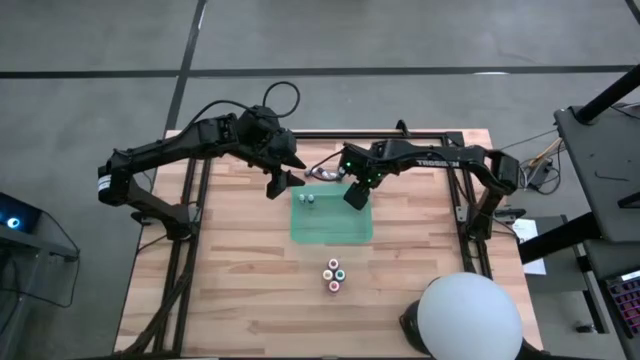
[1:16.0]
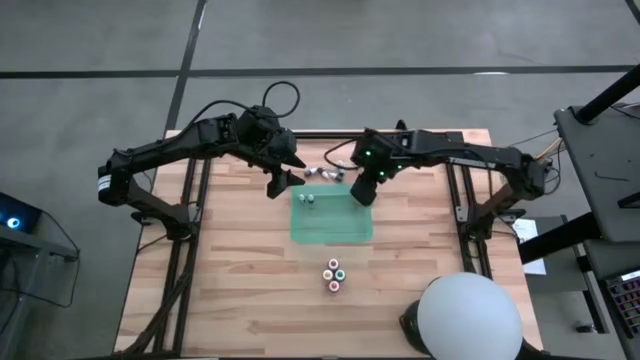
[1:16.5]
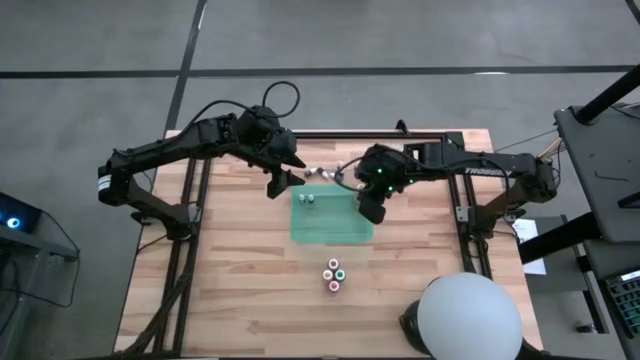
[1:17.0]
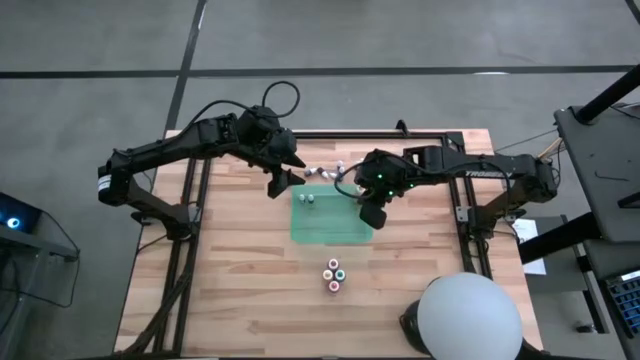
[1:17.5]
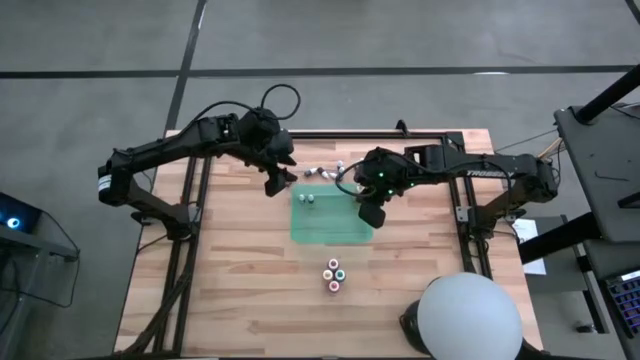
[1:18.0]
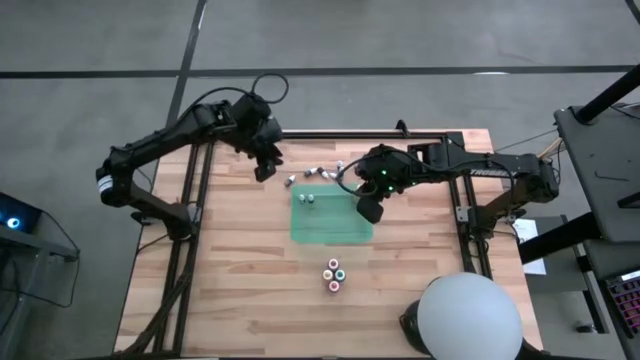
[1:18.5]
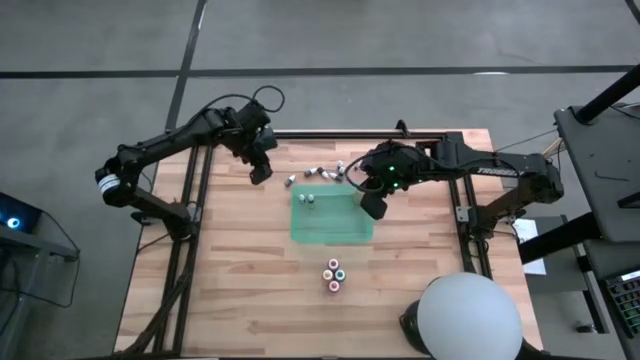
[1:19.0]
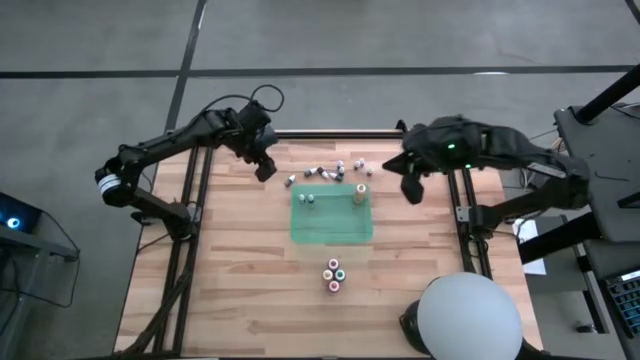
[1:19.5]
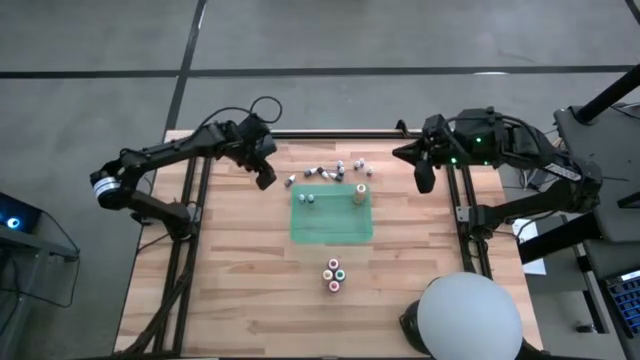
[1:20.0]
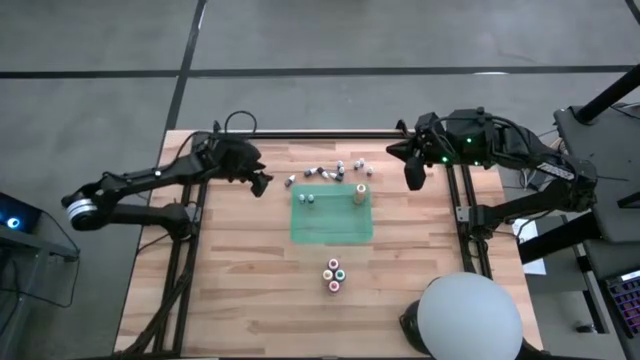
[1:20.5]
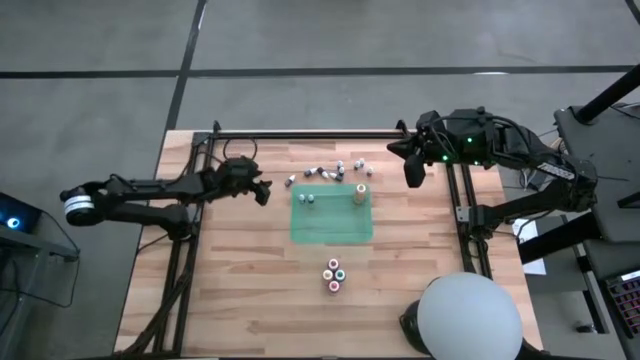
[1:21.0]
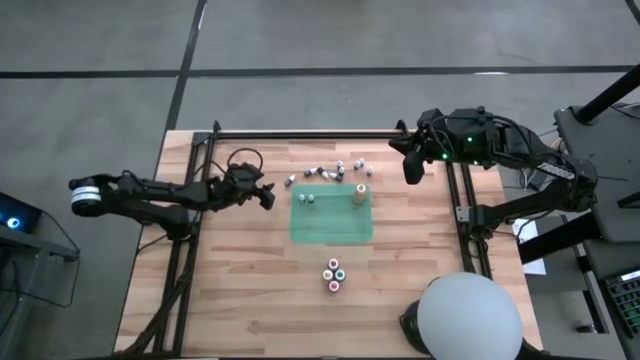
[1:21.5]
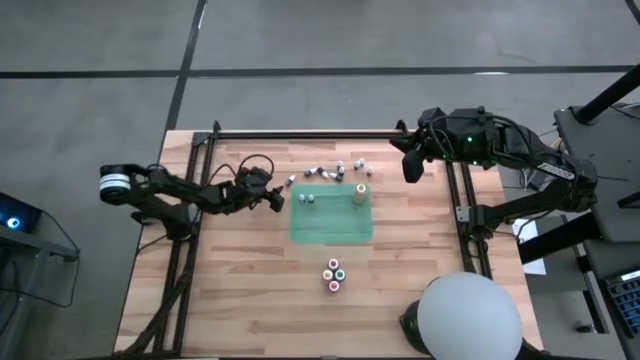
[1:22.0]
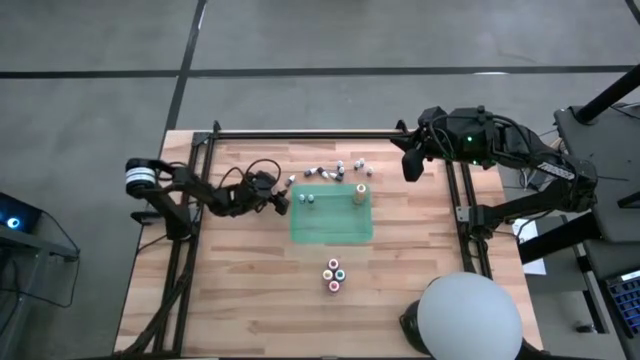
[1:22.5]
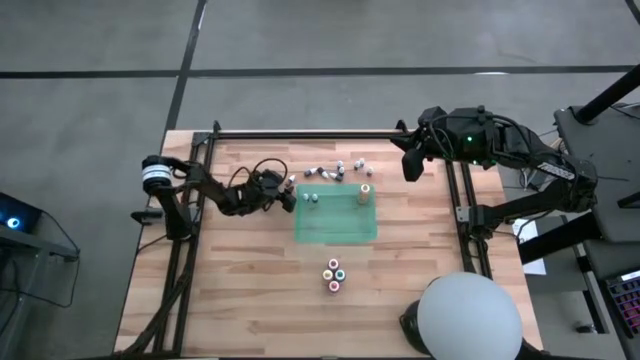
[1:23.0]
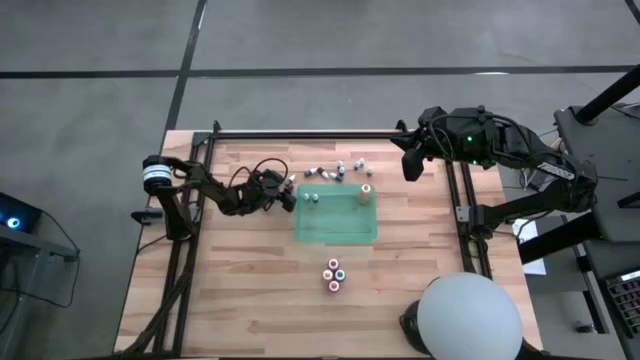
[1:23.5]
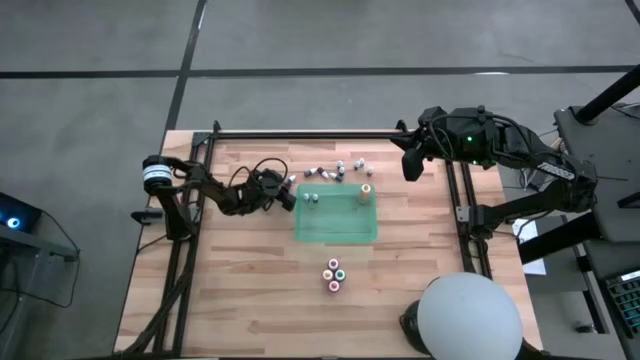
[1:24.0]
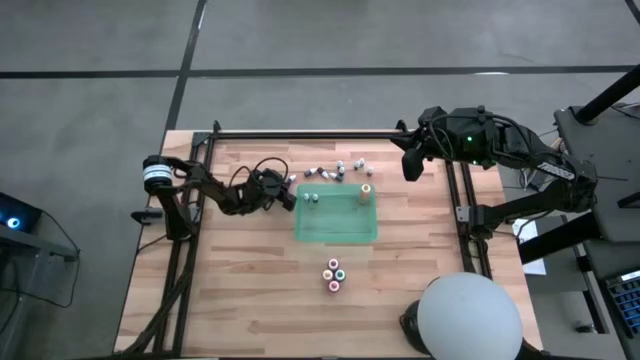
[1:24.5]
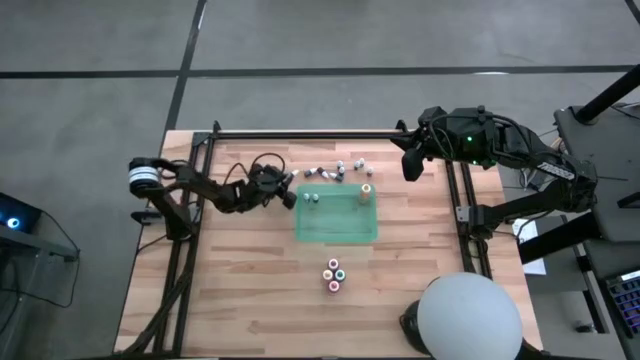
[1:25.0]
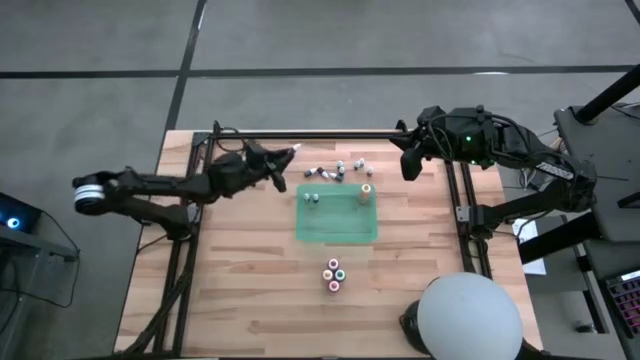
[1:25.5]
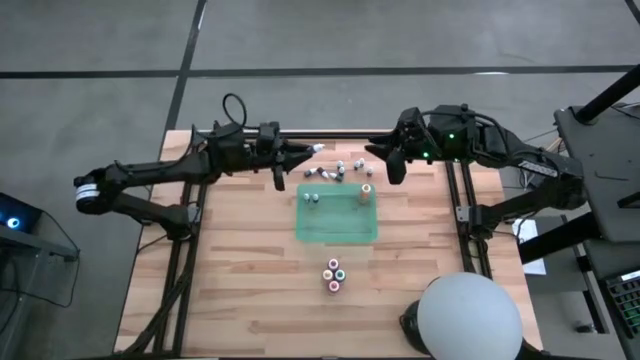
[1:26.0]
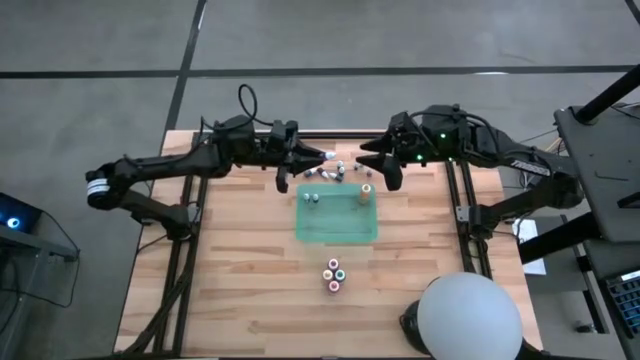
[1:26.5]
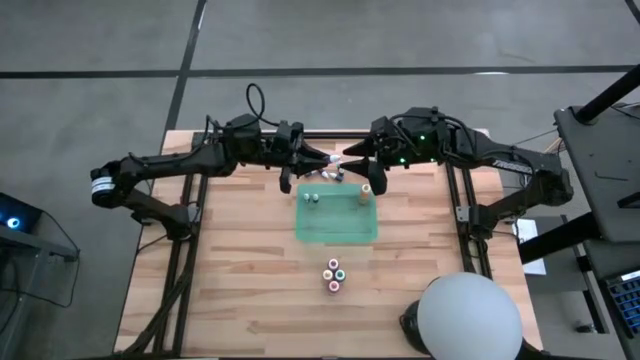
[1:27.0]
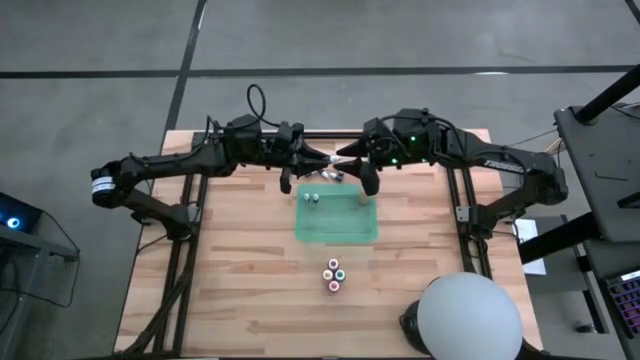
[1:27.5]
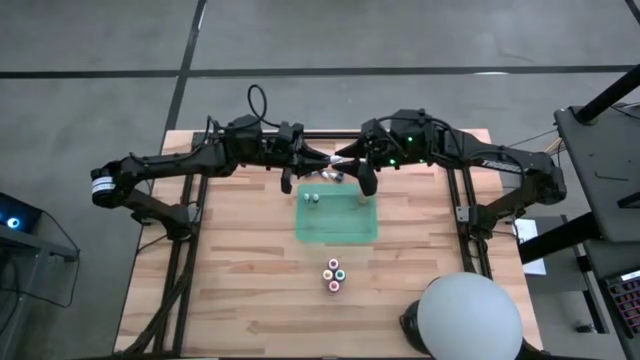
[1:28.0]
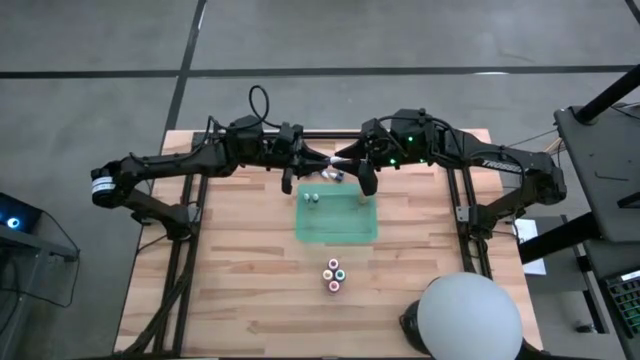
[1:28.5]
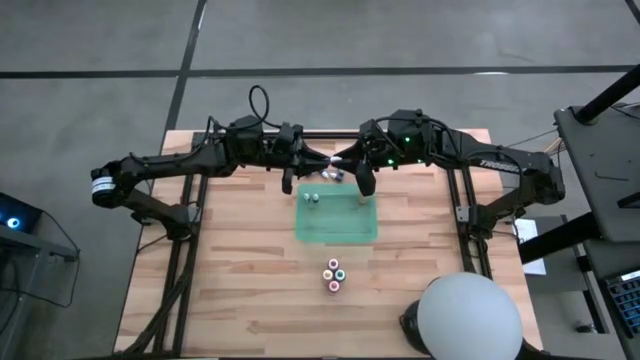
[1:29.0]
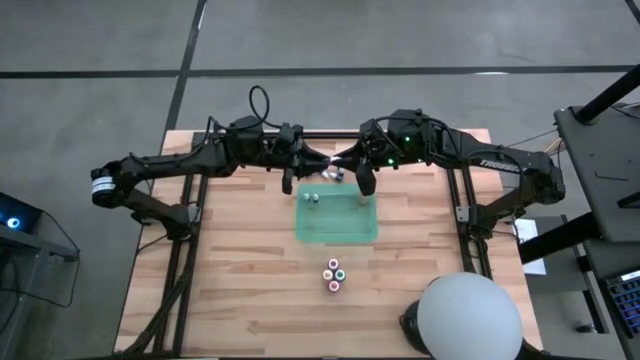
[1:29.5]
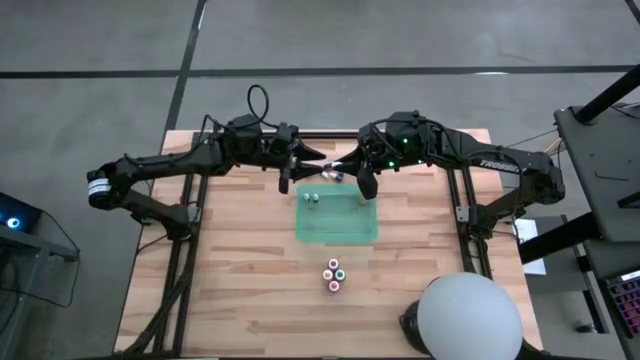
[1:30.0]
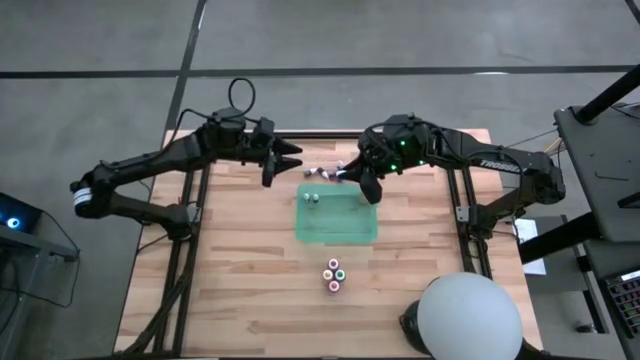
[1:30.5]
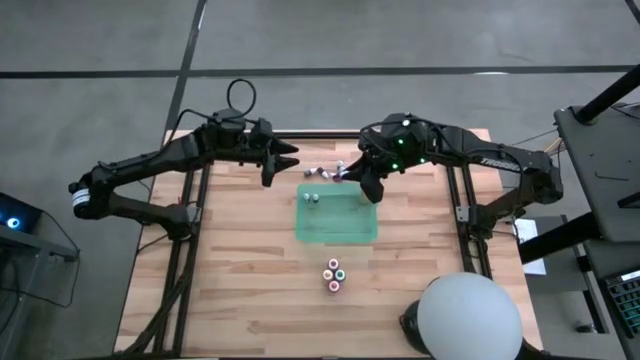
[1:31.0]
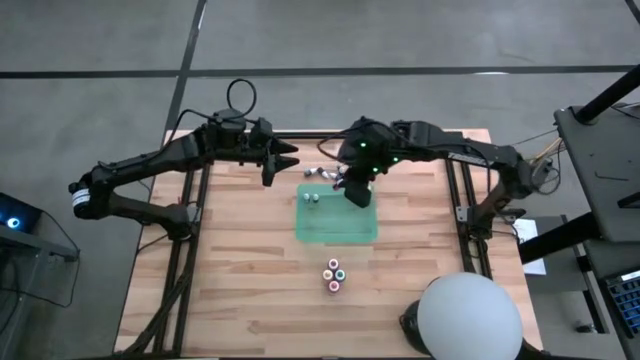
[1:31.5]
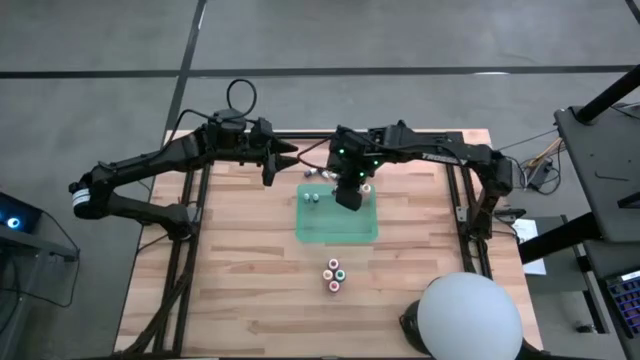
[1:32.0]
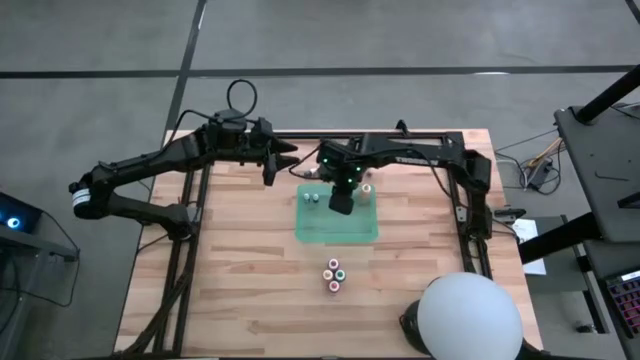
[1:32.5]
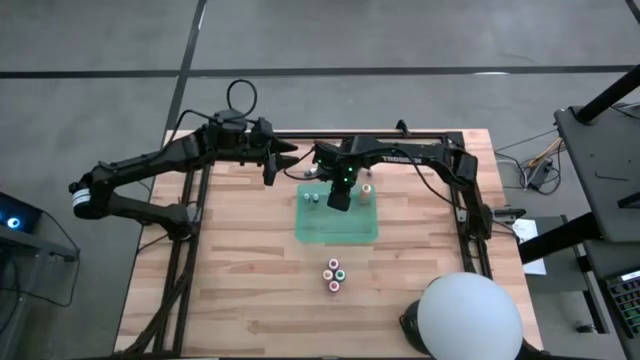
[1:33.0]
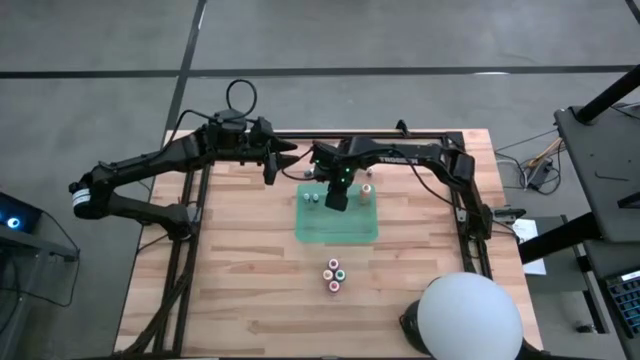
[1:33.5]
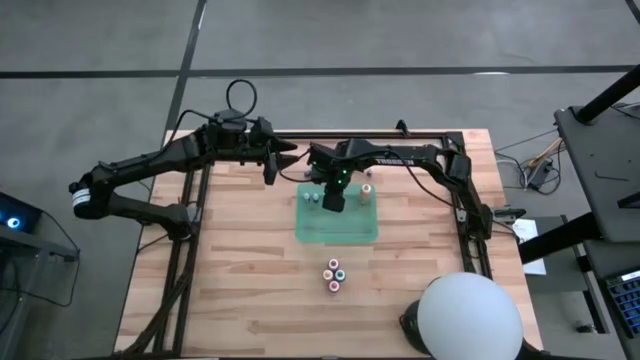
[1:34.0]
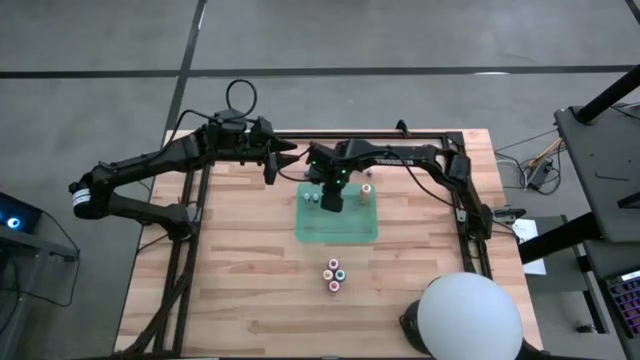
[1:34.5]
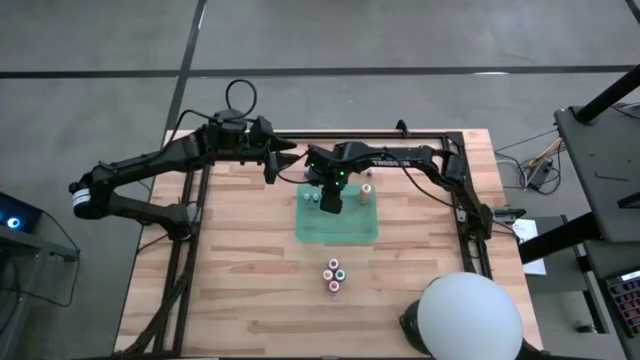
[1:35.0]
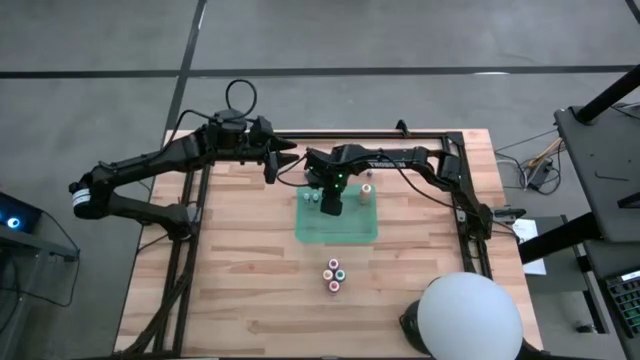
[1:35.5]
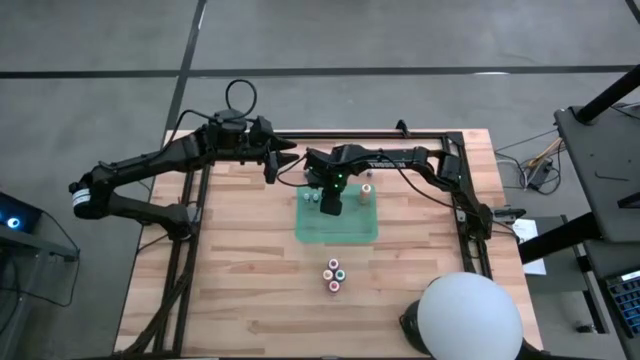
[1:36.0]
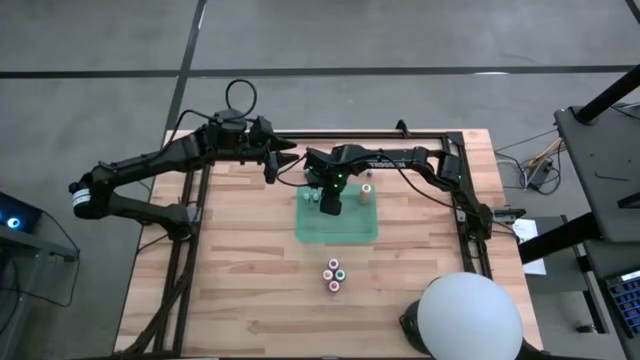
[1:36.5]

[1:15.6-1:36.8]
Task: Pick & Place food coloring
Put the red food coloring bottle into the green container

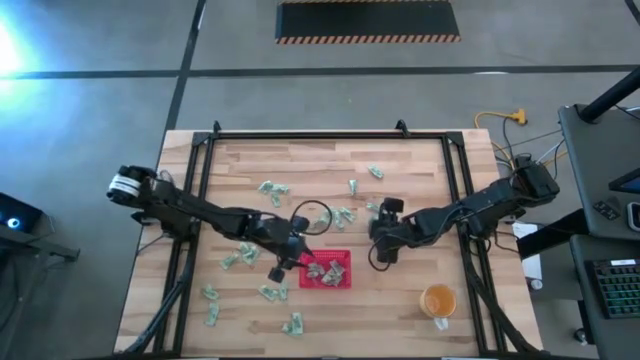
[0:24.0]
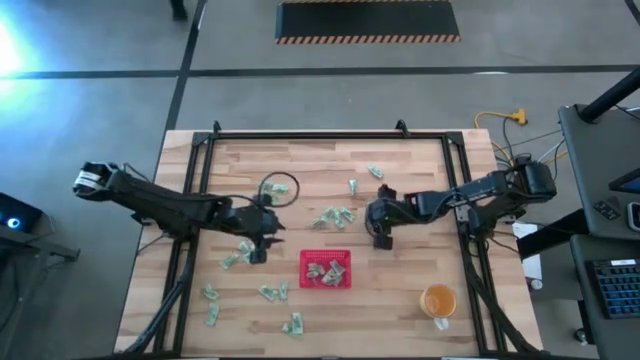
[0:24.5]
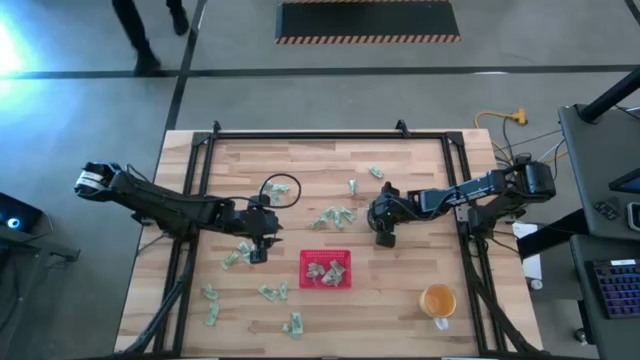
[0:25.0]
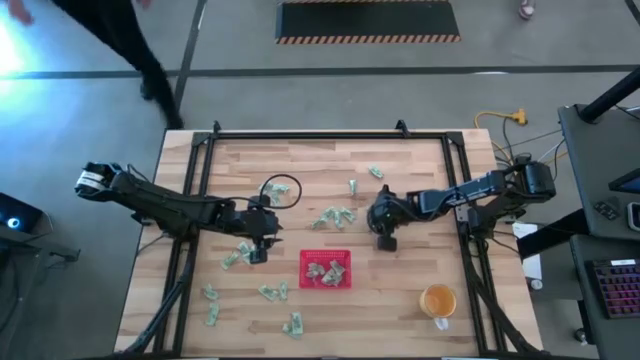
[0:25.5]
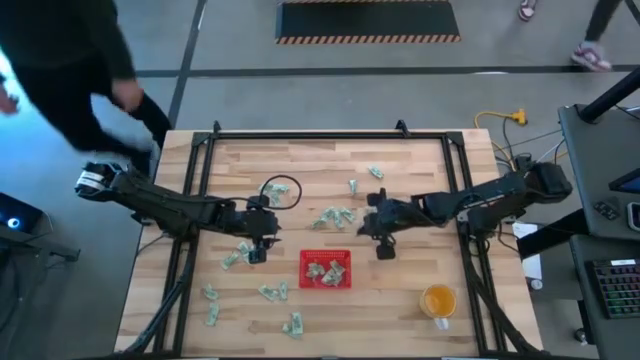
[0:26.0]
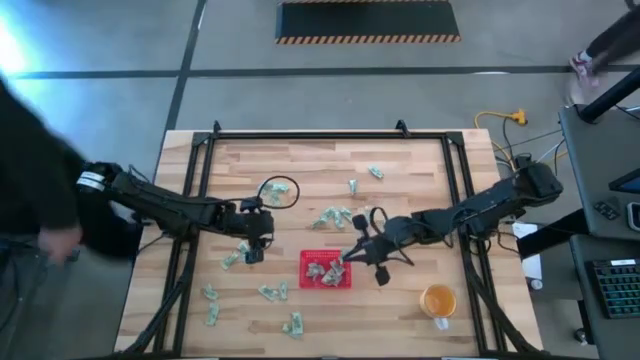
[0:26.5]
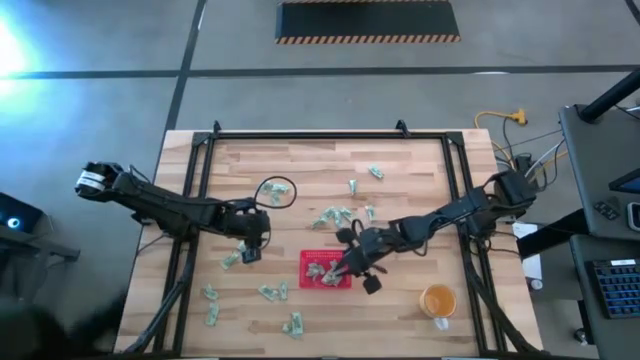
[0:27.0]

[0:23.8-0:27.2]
Task: Pick and place Stevia / Truvia into bins
Put the white stevia packet into the red bin
